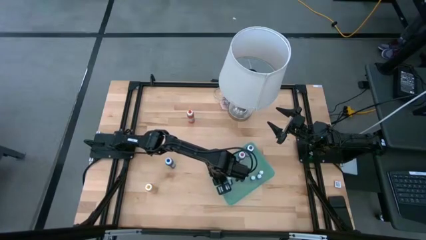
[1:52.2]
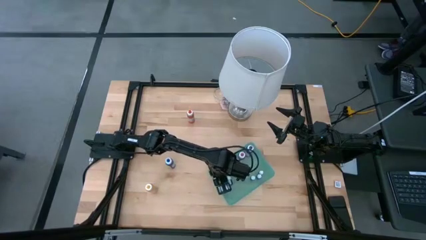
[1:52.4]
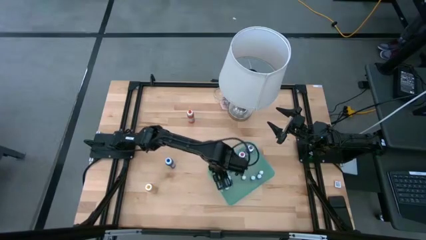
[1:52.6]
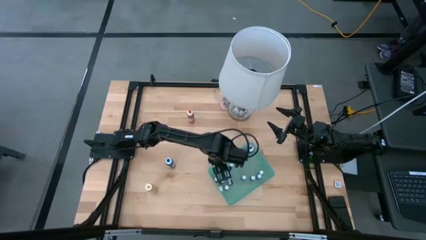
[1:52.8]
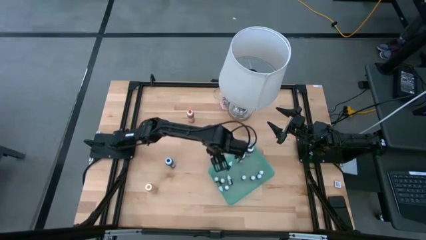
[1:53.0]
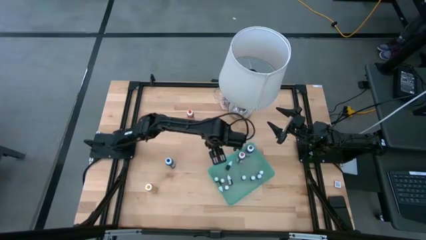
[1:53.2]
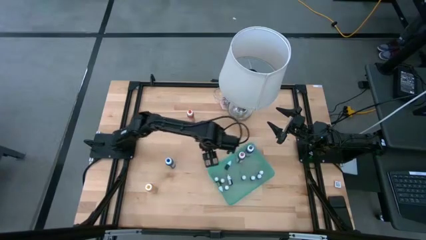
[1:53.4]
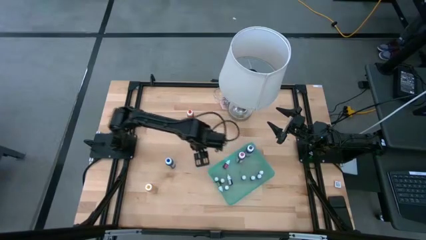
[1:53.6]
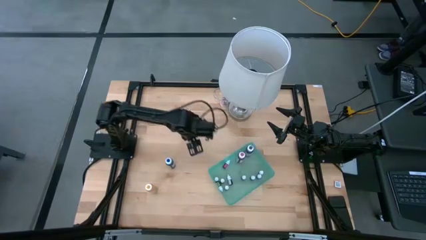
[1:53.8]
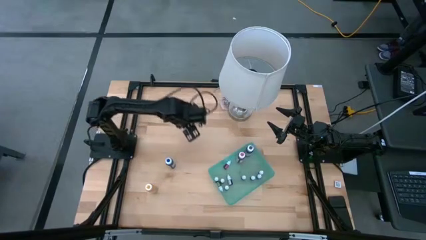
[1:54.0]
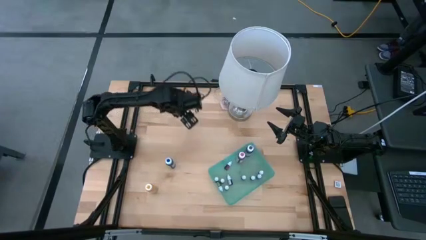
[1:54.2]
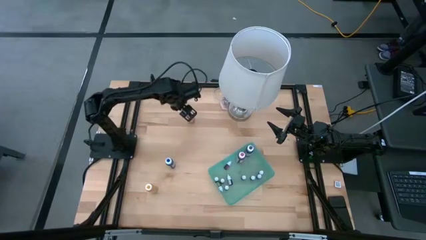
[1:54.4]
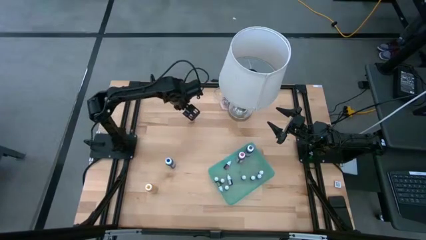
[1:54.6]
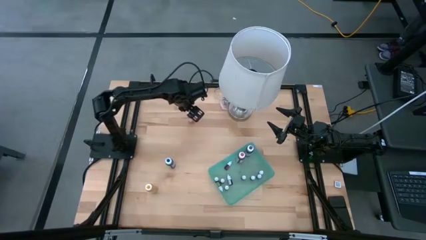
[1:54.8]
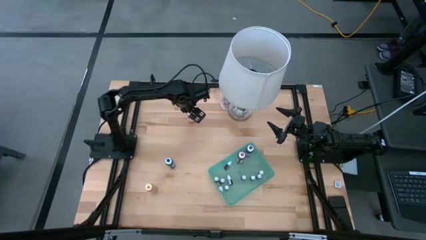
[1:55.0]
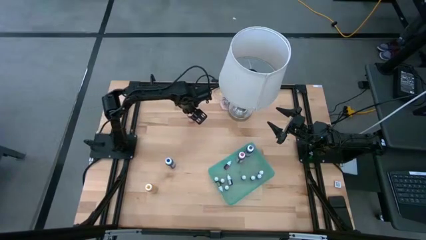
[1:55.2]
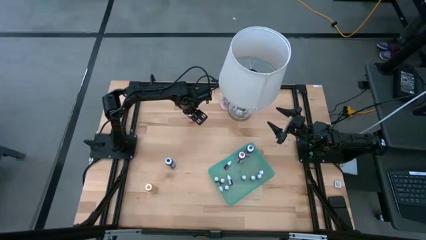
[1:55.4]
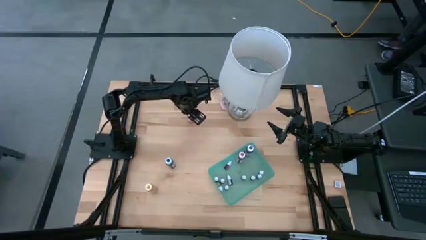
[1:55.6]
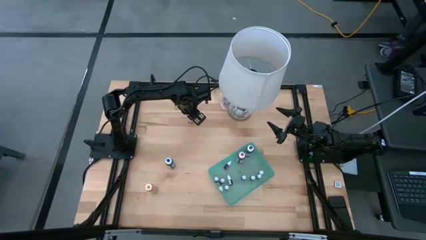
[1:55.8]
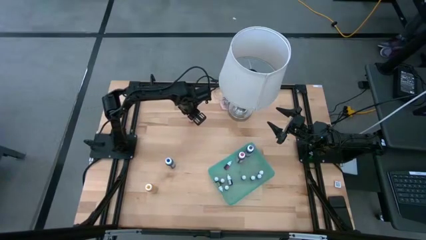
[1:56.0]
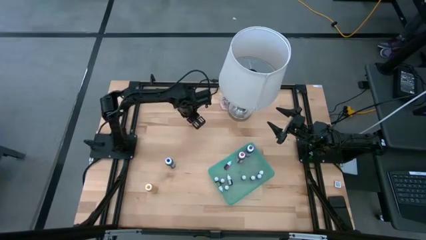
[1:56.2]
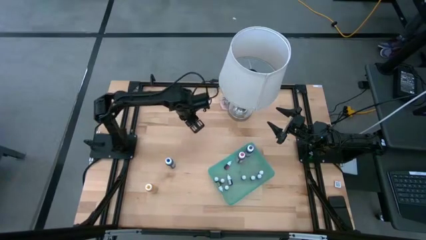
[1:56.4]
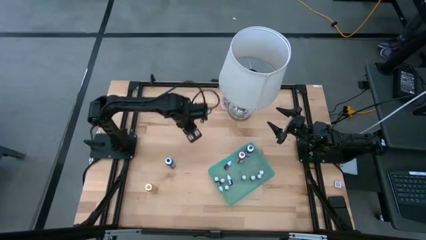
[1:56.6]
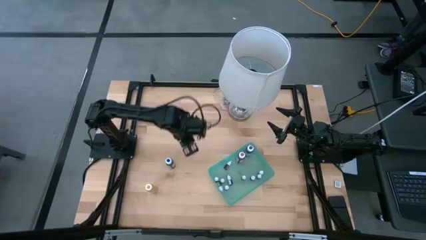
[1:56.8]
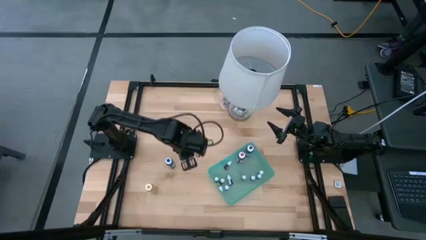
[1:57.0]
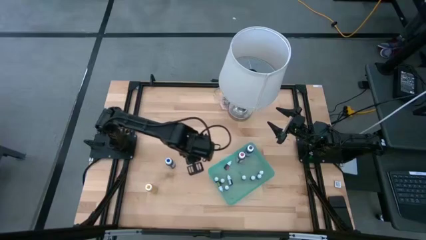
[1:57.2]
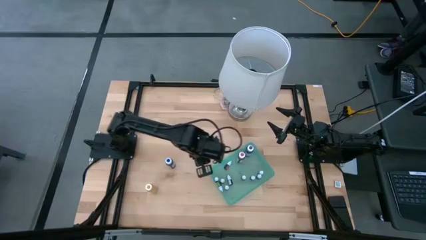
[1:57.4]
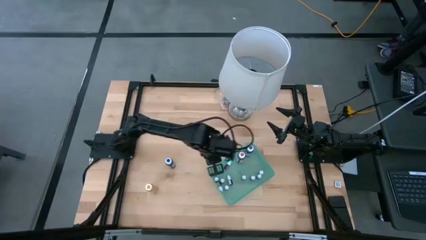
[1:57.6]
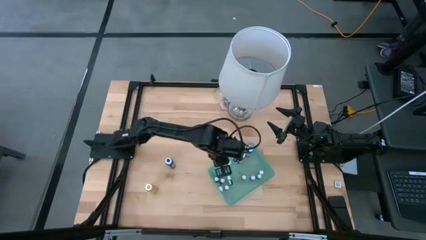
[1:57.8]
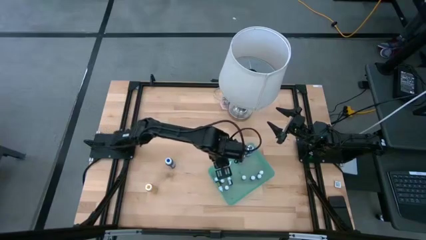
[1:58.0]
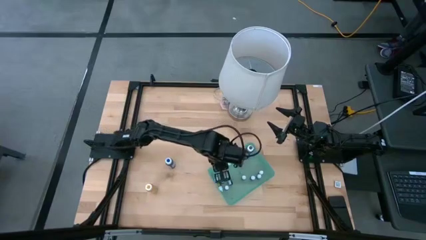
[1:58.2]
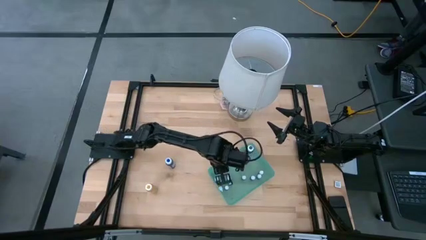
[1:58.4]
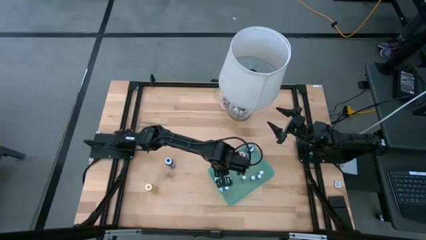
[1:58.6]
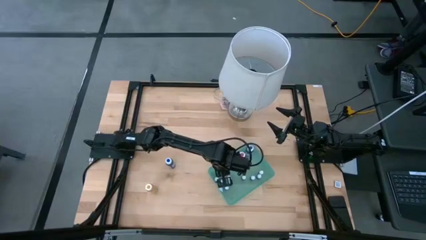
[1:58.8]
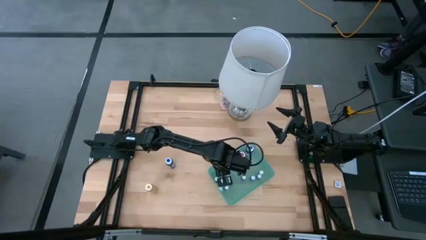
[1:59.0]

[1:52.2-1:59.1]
Task: Pick & Place food coloring
Put the large orange food coloring bottle into the green bin

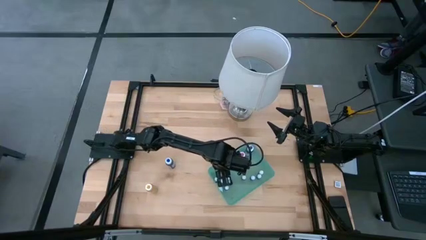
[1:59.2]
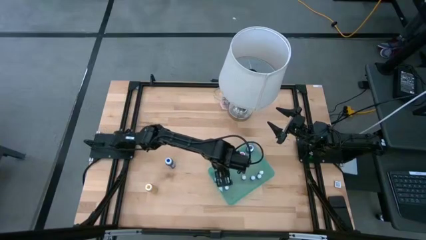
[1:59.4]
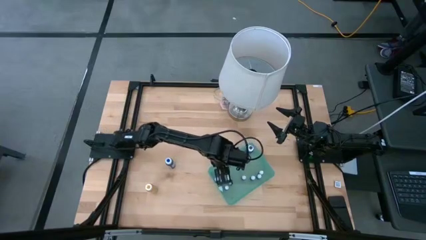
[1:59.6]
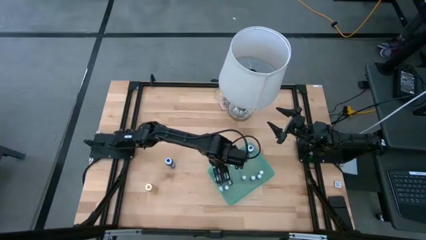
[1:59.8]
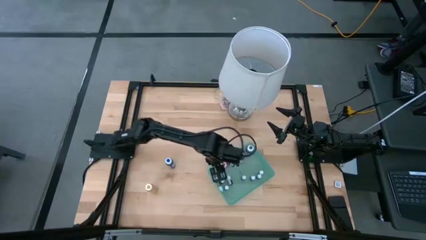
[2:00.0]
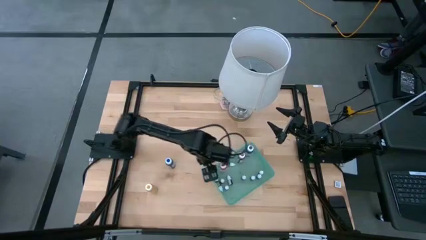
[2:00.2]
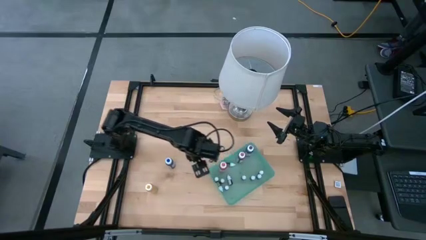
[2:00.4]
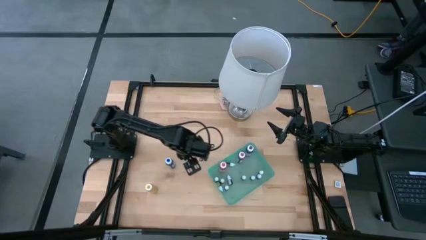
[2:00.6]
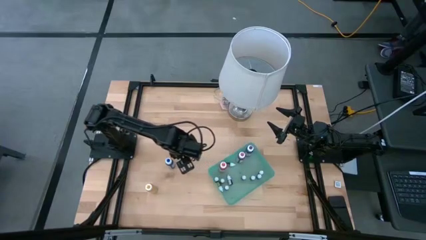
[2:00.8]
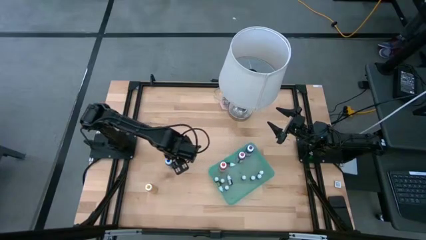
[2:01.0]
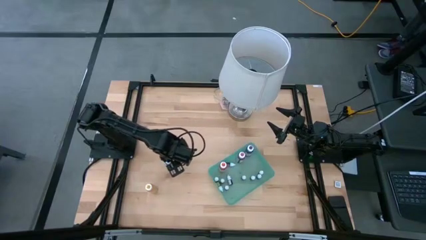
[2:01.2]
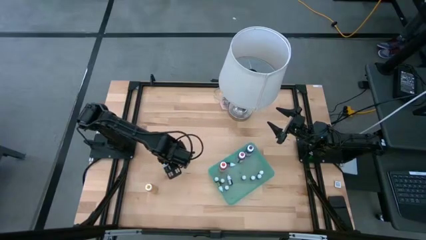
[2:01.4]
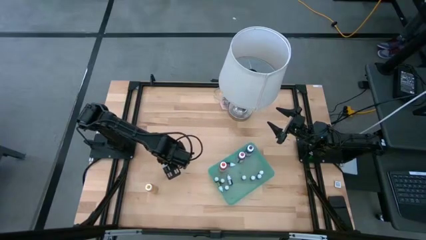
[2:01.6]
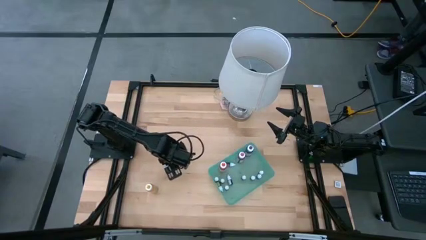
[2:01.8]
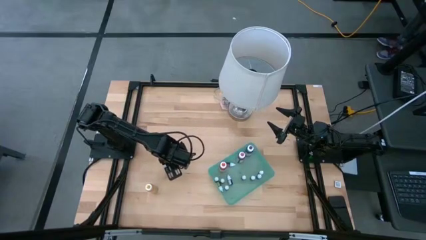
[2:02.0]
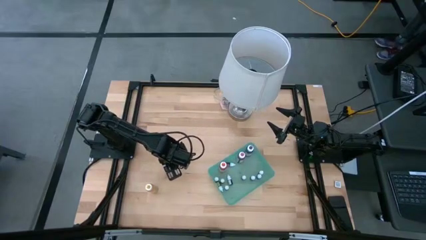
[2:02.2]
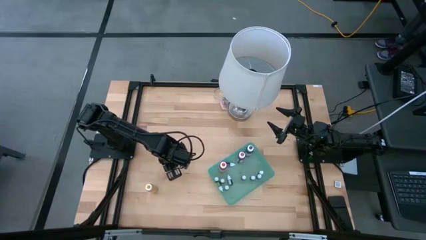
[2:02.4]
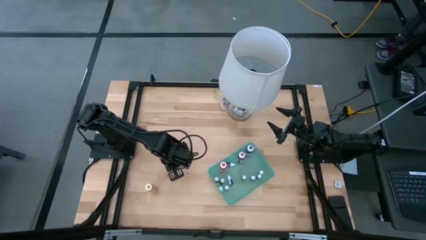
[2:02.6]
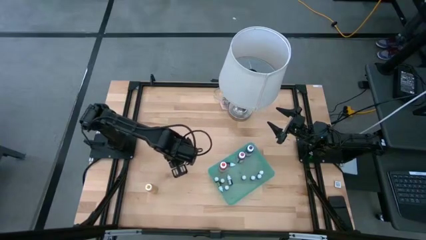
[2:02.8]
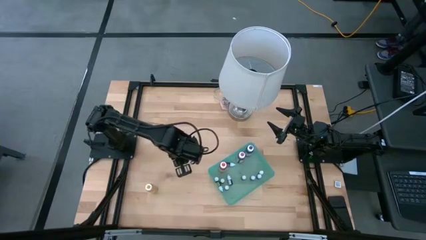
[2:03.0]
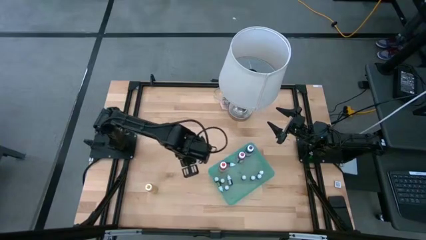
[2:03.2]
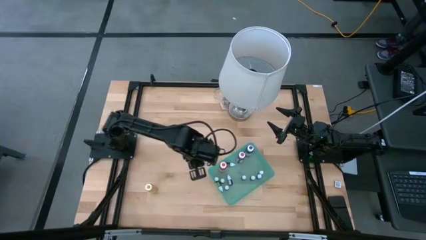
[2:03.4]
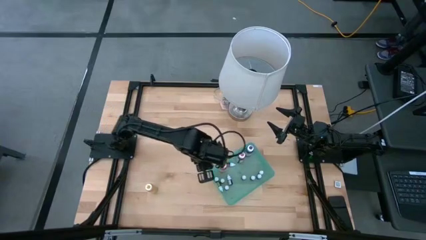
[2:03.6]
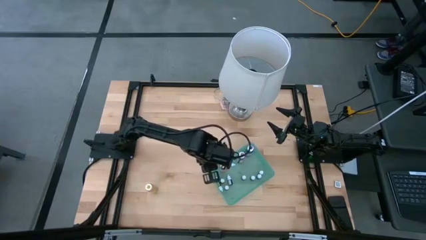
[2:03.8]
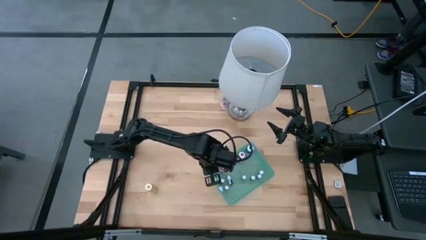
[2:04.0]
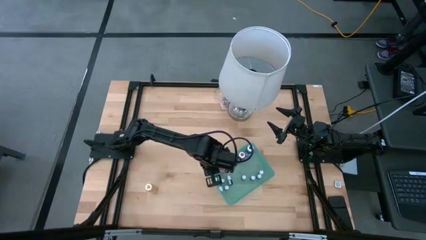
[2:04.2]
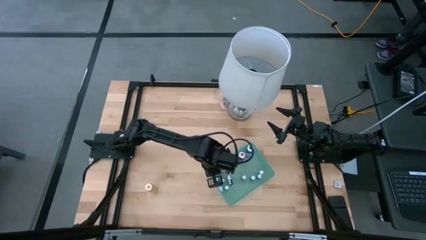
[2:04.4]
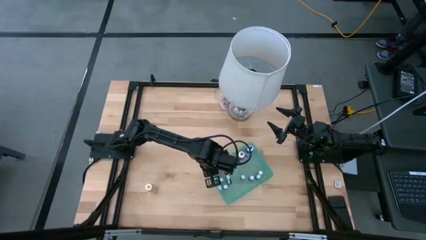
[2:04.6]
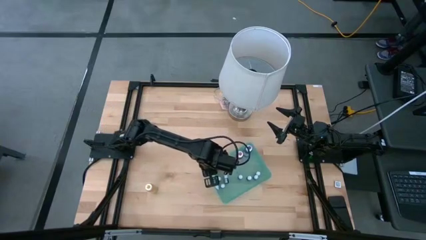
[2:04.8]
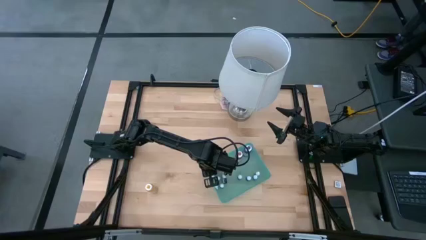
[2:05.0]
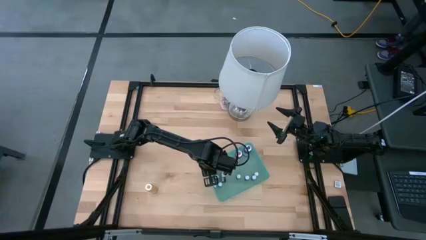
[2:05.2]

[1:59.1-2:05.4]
Put the large blue food coloring bottle into the green bin
